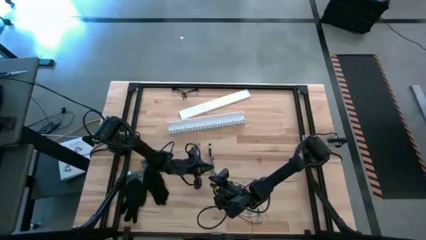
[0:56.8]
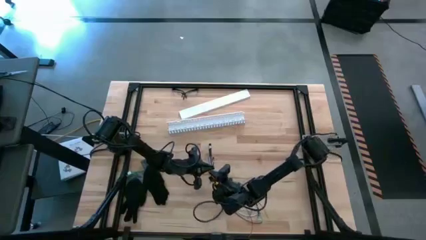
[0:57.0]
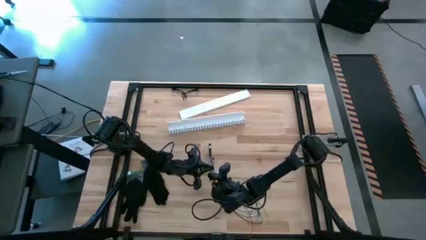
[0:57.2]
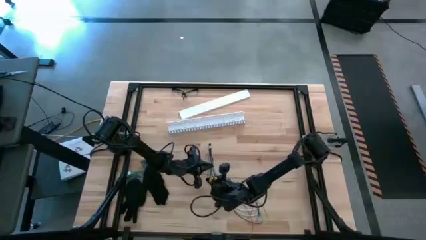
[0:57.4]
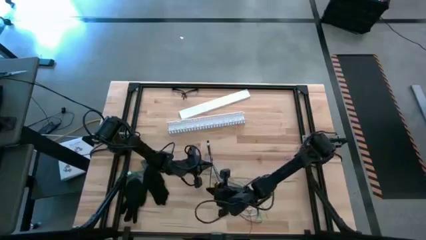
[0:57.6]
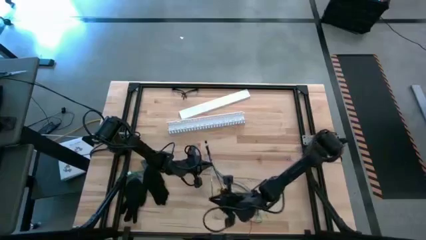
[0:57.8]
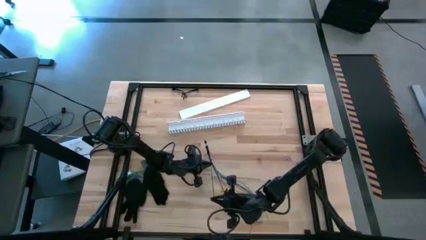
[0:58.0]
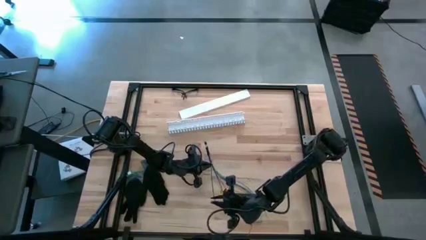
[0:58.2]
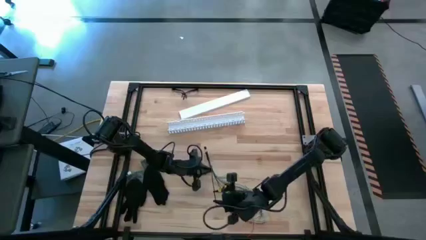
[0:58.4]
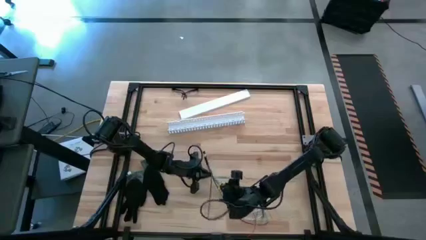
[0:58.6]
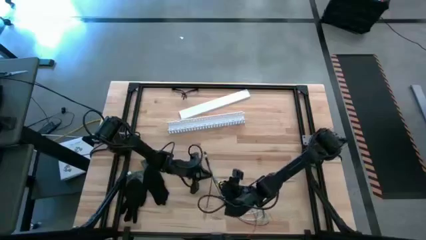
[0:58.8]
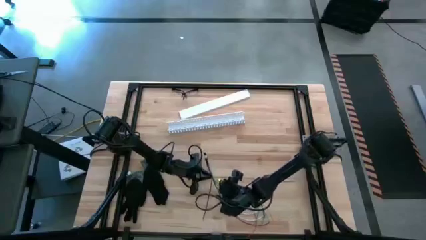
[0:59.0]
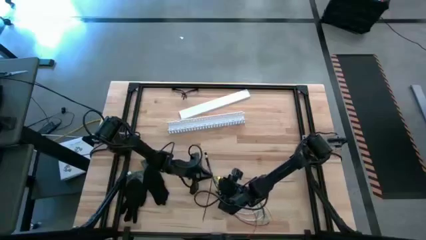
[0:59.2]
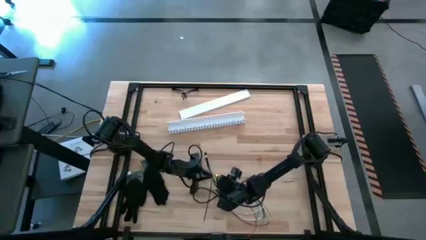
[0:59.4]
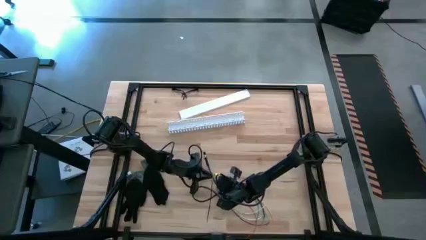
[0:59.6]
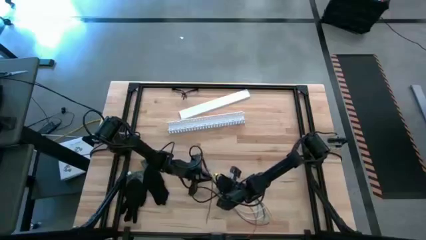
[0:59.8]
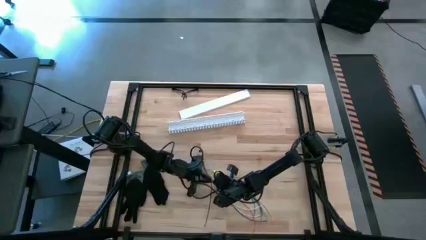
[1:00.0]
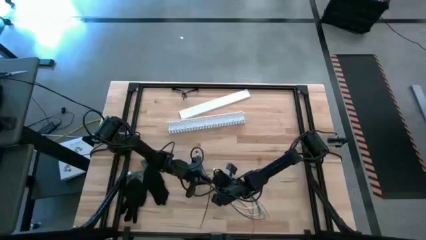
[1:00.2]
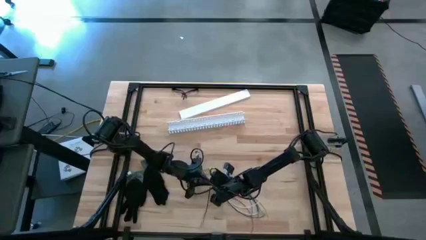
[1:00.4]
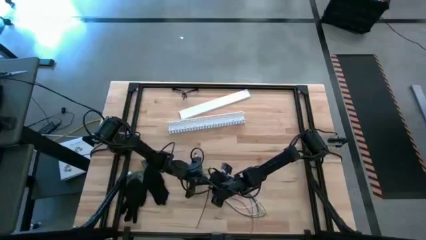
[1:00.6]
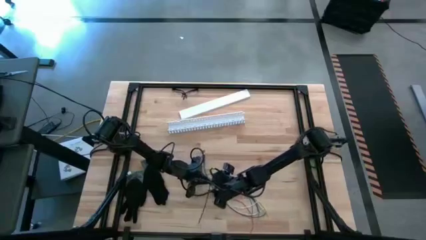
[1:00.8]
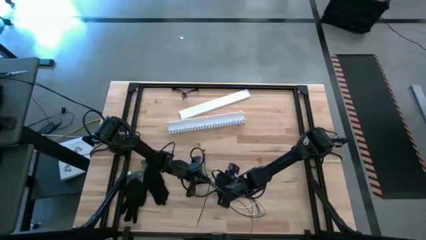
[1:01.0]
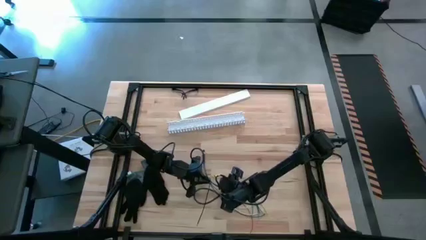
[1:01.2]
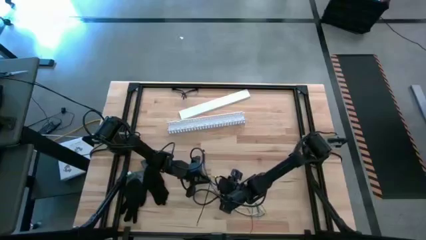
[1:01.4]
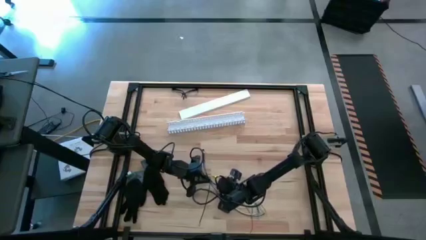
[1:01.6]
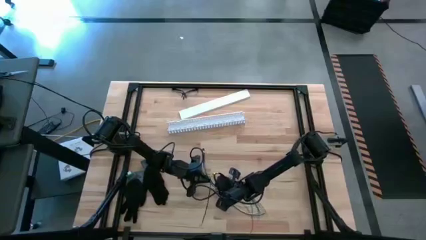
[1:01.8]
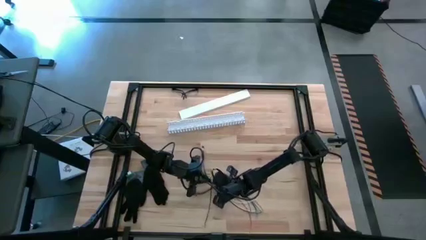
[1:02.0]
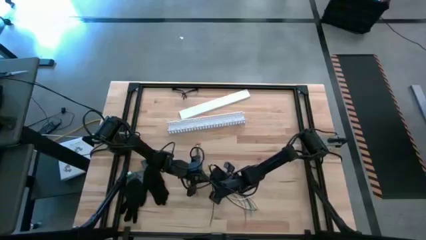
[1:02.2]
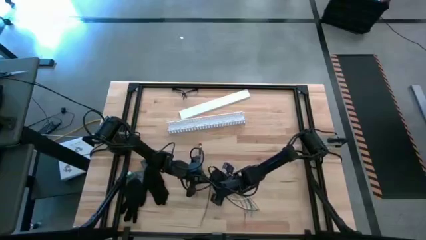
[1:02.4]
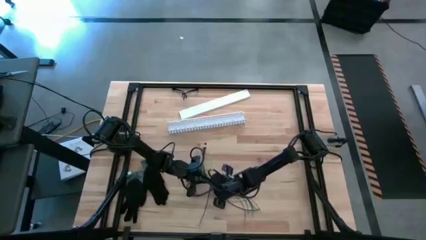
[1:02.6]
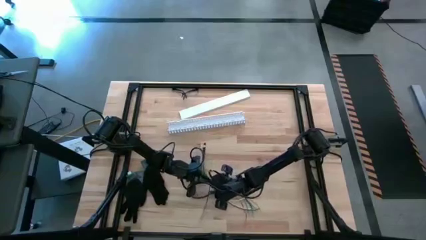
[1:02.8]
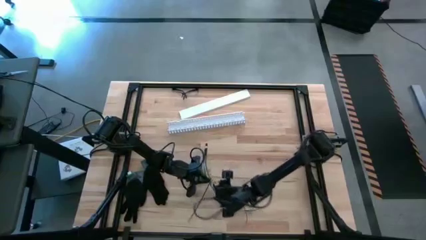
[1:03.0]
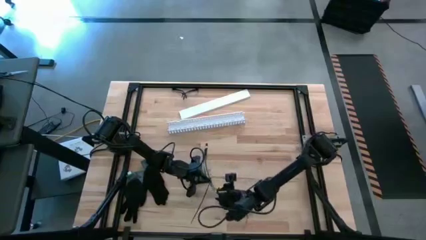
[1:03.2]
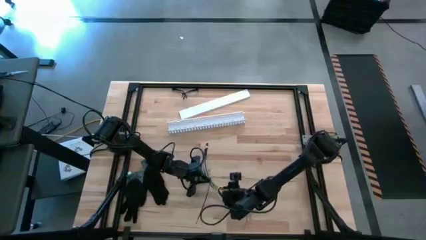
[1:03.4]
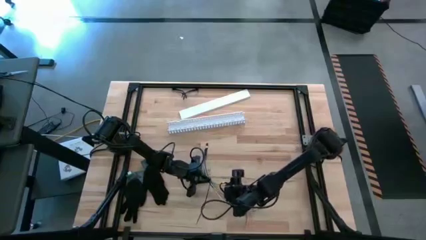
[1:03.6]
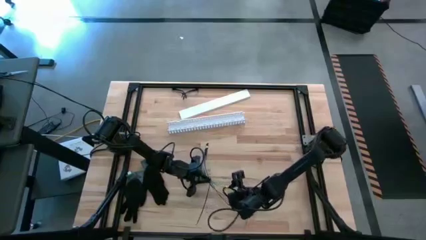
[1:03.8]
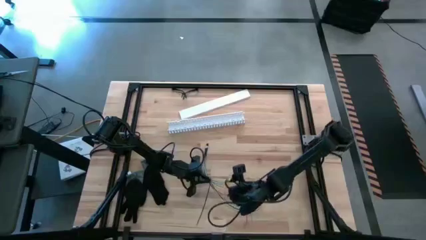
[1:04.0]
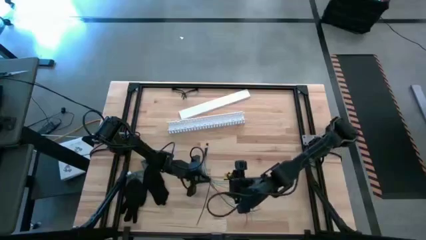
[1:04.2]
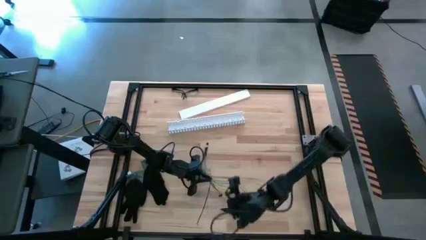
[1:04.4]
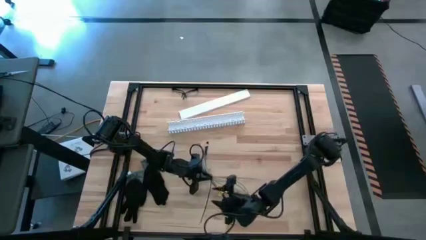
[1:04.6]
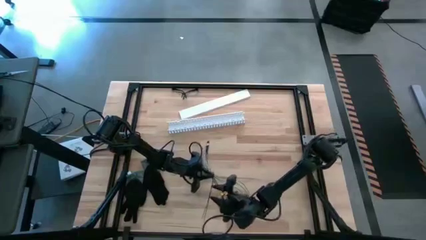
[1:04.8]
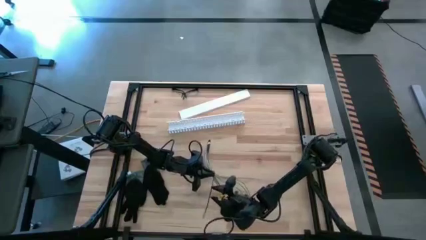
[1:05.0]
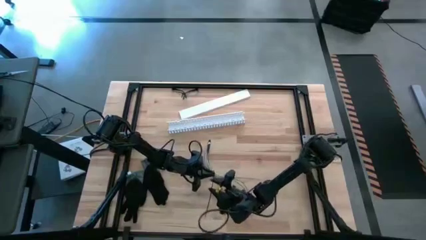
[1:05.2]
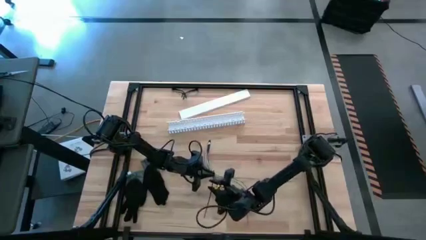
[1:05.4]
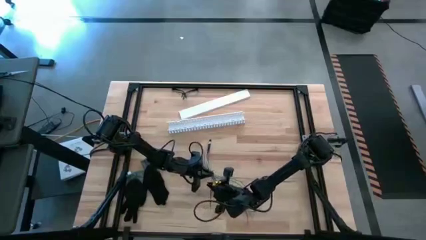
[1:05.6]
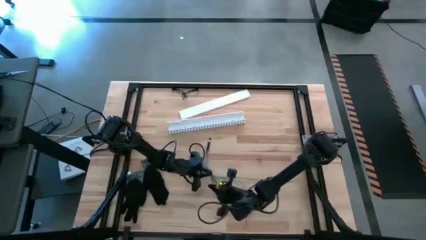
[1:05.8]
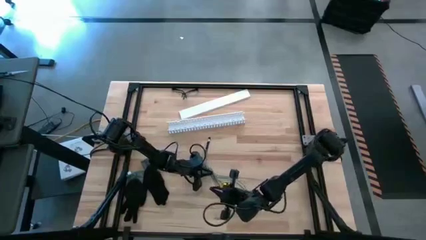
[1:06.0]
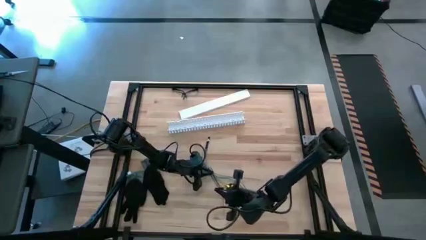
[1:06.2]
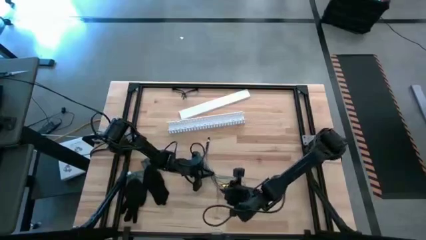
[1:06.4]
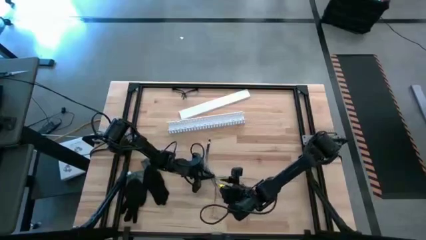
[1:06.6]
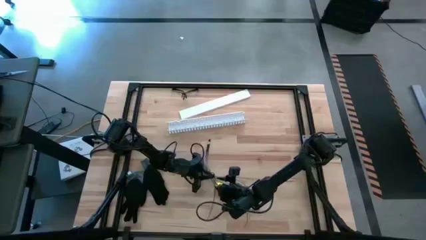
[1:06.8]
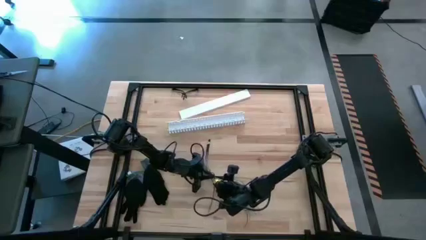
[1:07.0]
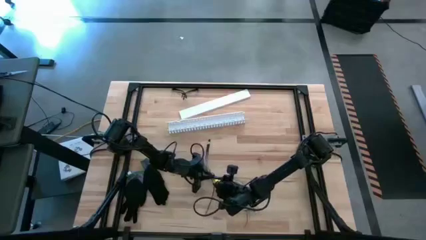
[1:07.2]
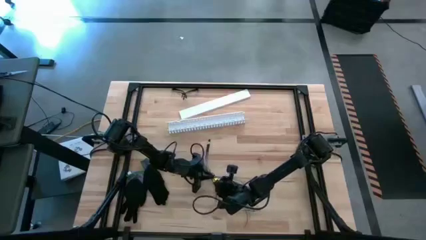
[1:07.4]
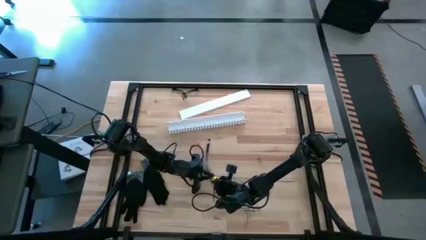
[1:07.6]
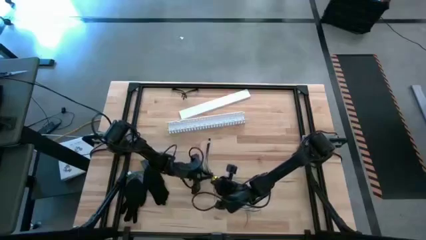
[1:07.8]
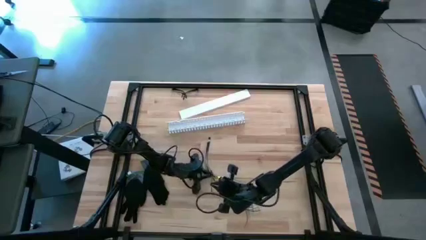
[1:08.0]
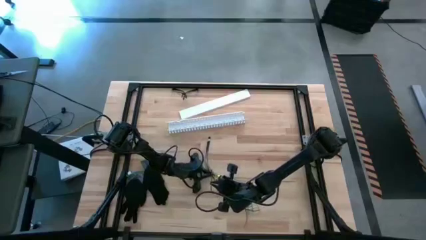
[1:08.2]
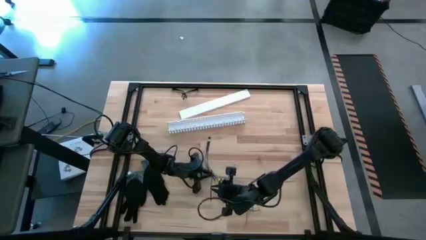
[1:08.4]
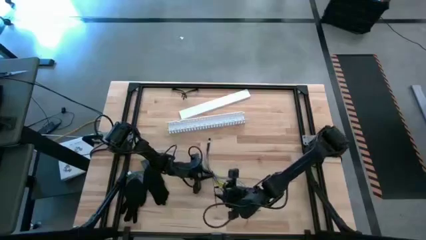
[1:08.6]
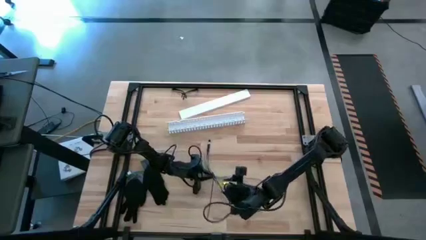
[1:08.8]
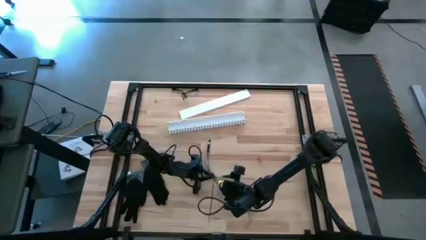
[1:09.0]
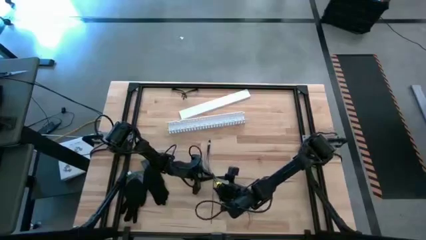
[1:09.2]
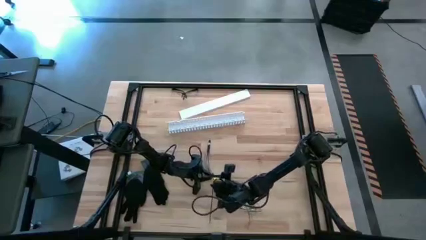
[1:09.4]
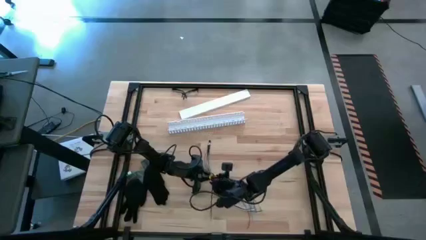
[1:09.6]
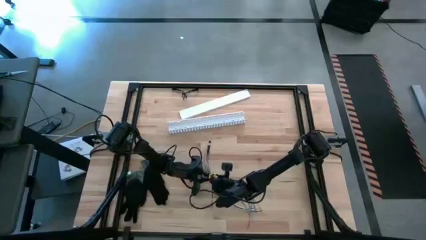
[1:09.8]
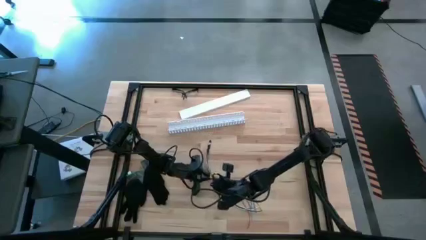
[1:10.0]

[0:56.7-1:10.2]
Task: Ziptie cables
Wrap the black zip tie on the cable

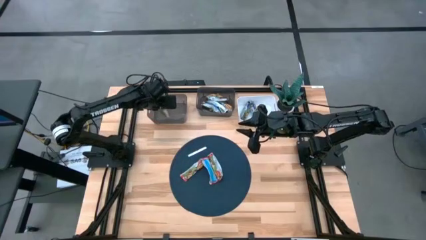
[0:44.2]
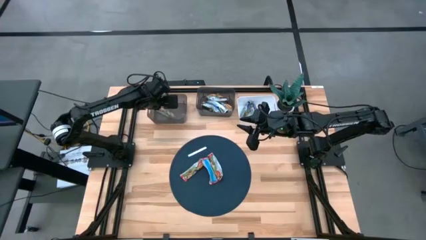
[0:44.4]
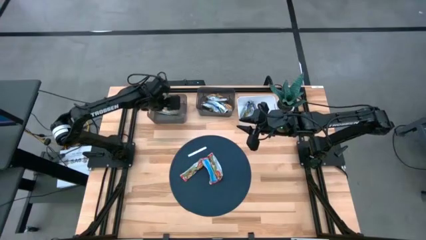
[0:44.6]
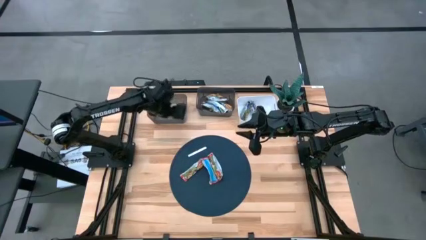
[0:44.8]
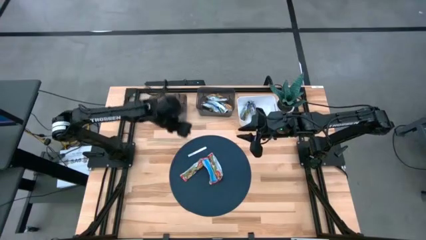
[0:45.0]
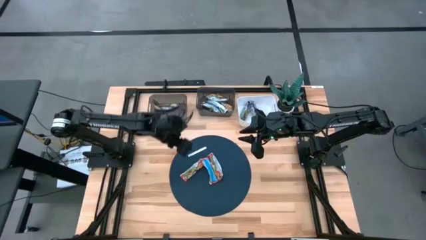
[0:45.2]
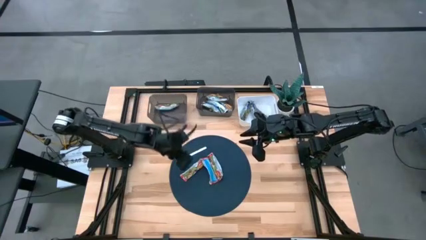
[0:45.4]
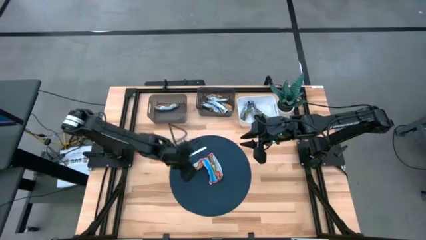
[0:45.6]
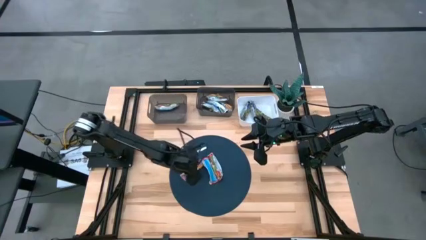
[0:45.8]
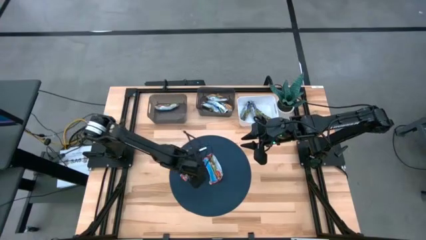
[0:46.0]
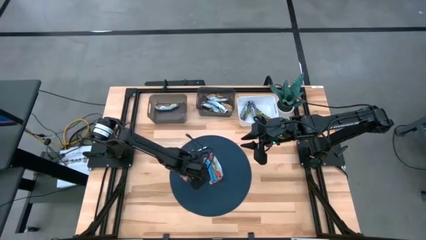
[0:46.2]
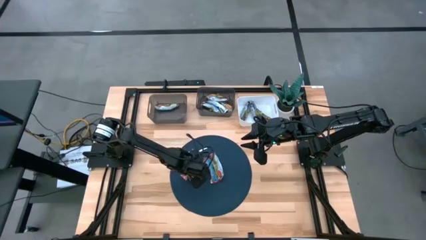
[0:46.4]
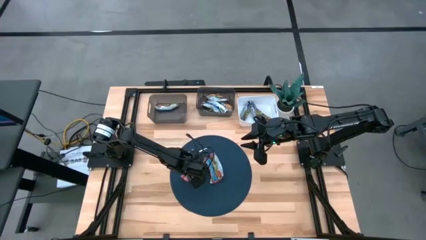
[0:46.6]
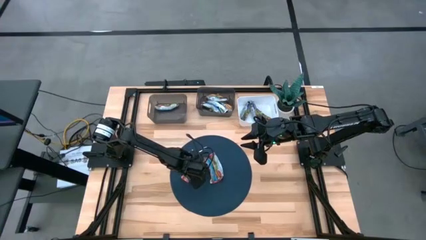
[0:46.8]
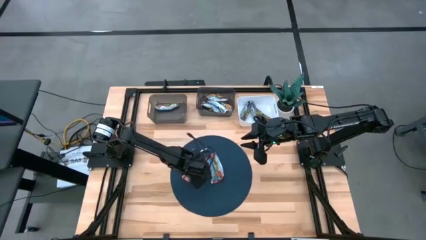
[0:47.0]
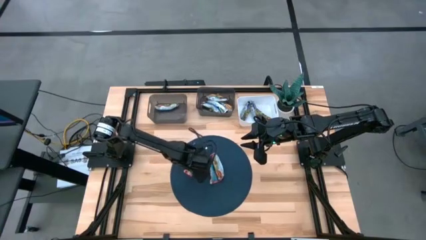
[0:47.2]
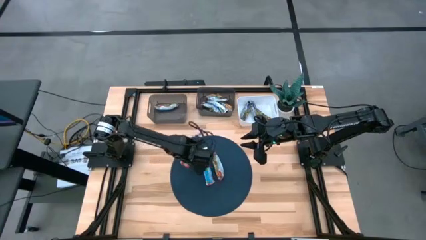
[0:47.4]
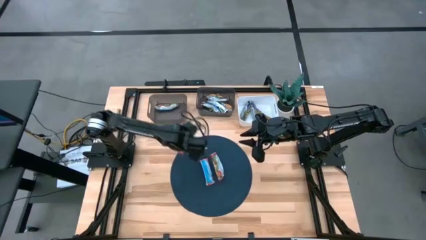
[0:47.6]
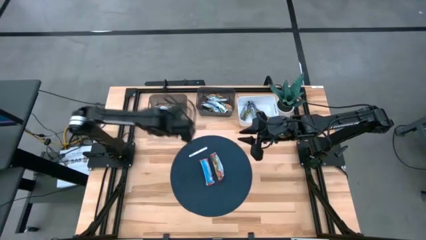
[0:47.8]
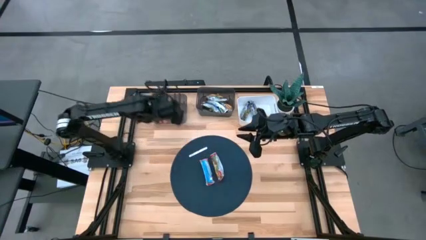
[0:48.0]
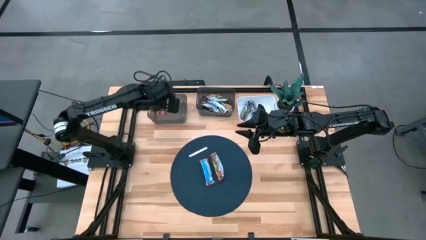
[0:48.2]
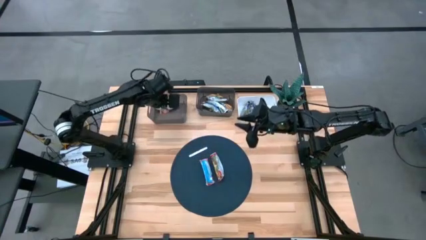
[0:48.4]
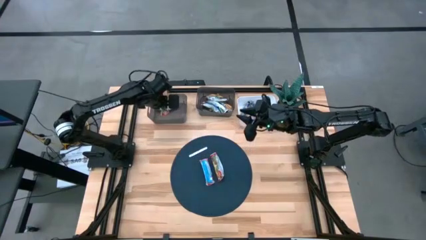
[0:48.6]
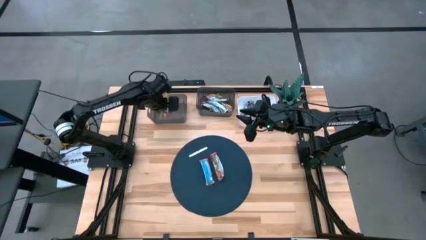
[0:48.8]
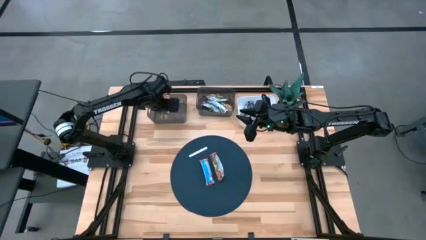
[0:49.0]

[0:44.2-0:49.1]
Task: Pick and place Granola Bars by type
Put the red granola bar into the left black bin
